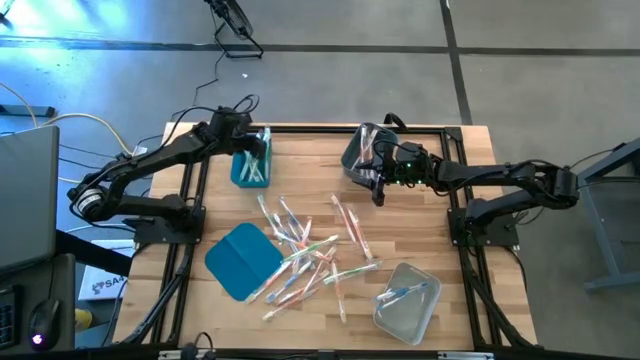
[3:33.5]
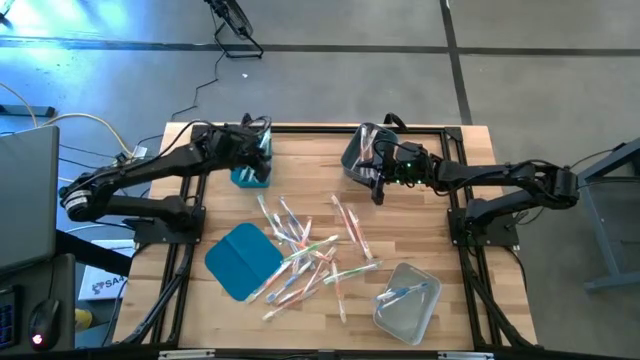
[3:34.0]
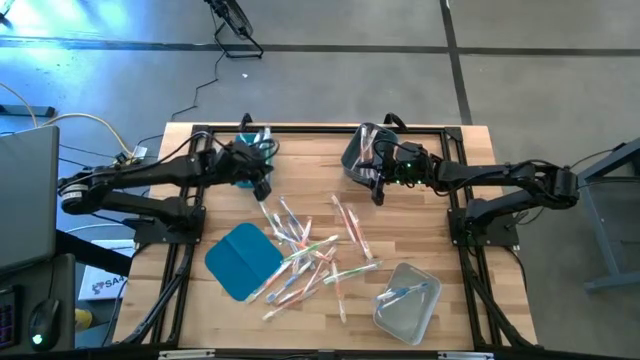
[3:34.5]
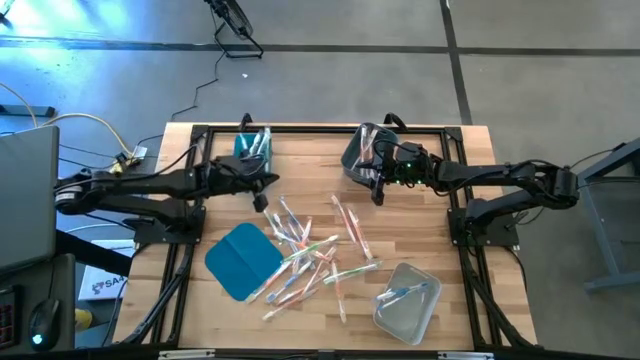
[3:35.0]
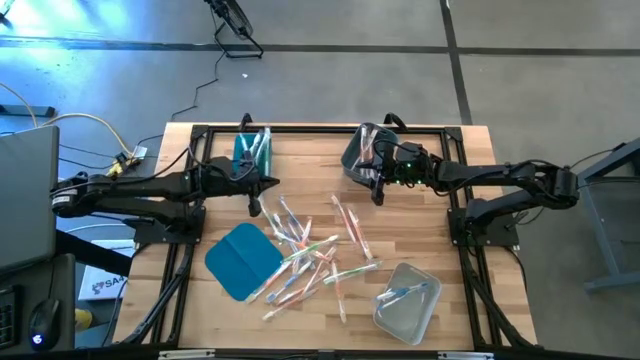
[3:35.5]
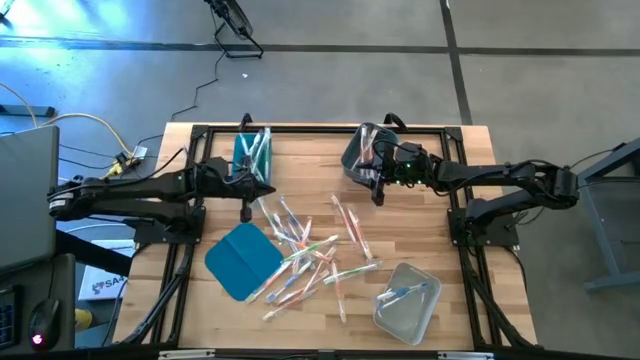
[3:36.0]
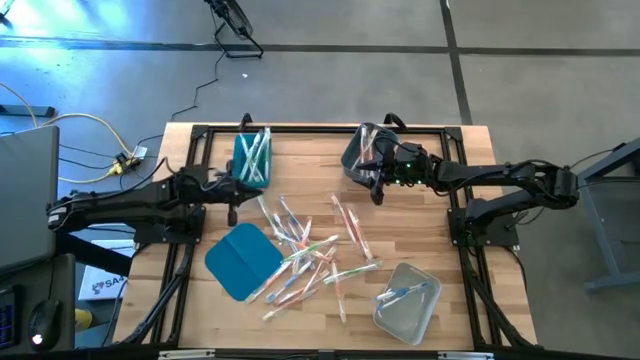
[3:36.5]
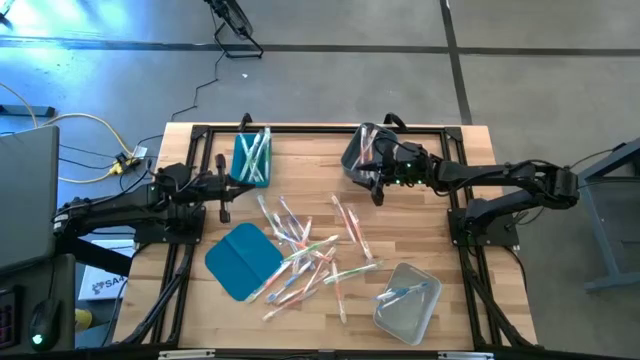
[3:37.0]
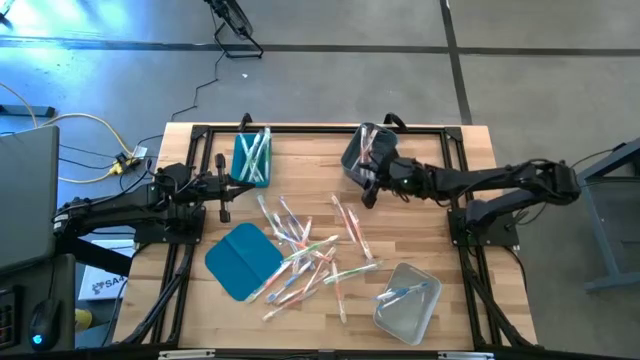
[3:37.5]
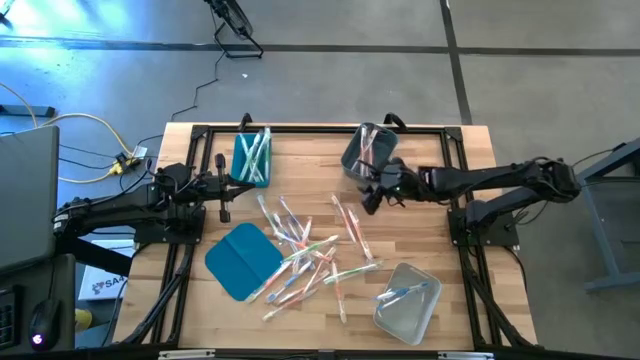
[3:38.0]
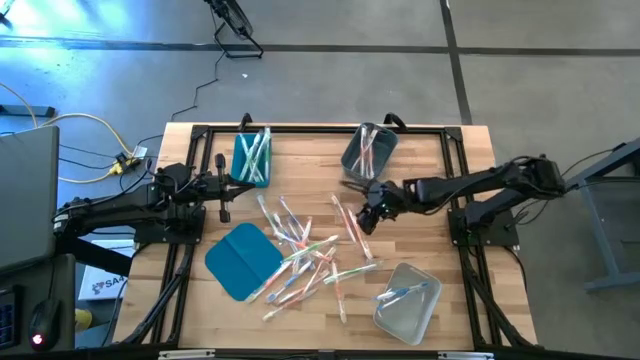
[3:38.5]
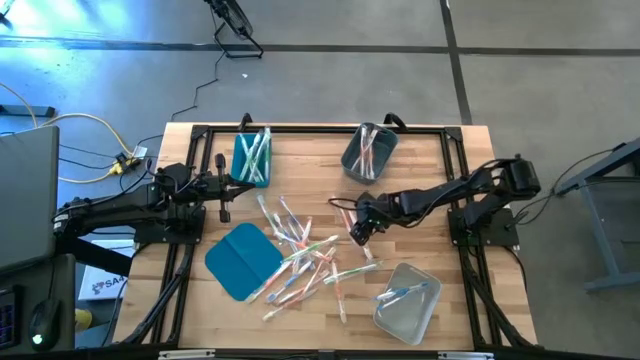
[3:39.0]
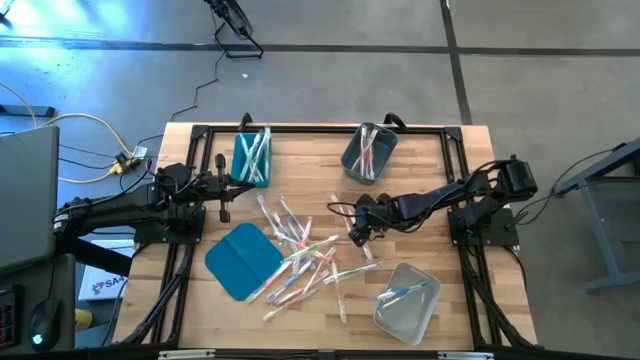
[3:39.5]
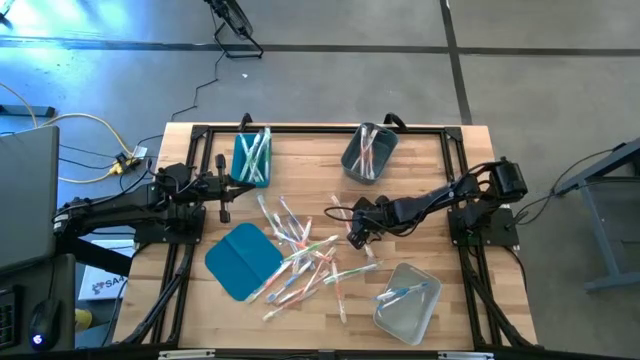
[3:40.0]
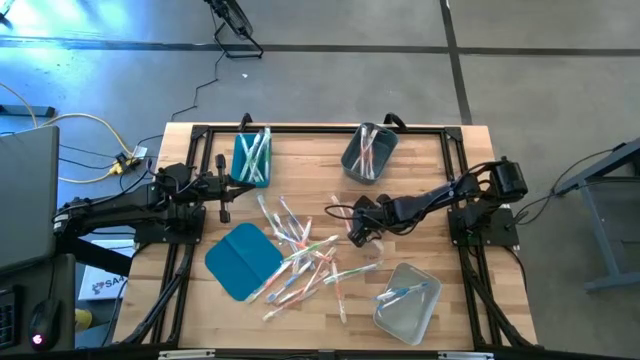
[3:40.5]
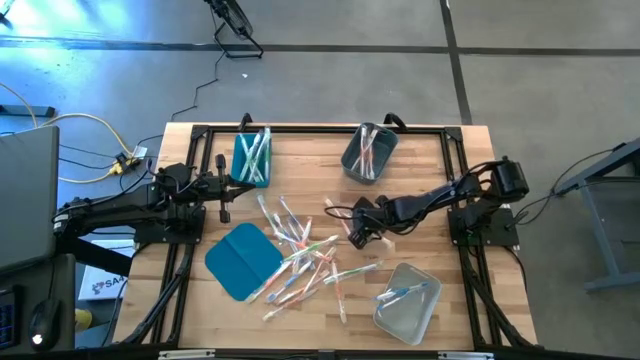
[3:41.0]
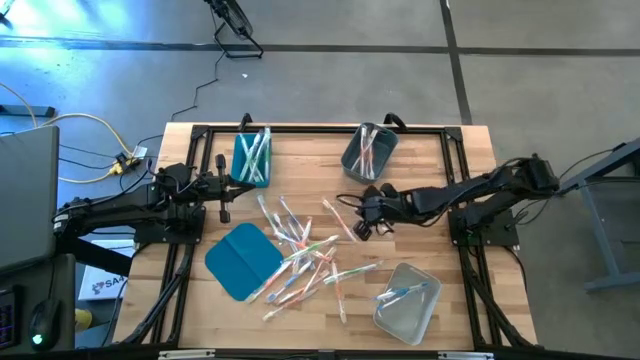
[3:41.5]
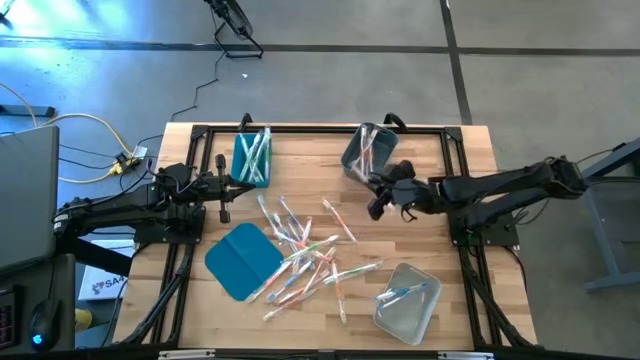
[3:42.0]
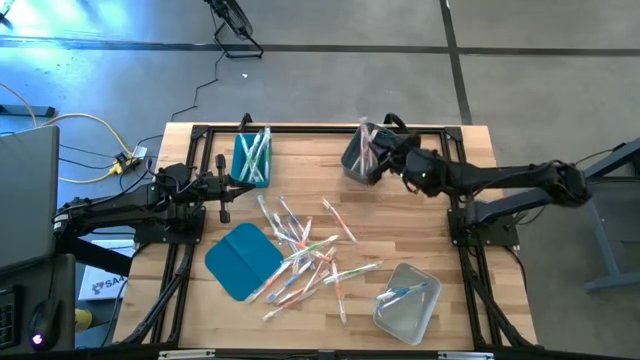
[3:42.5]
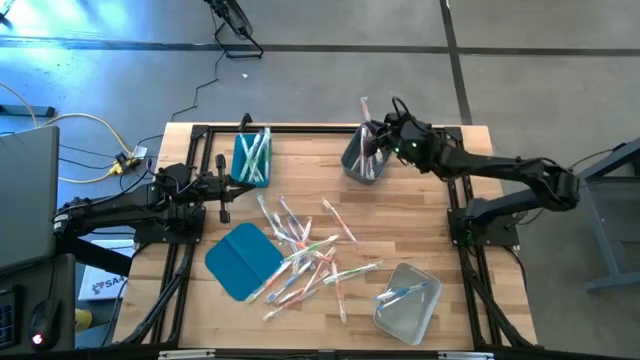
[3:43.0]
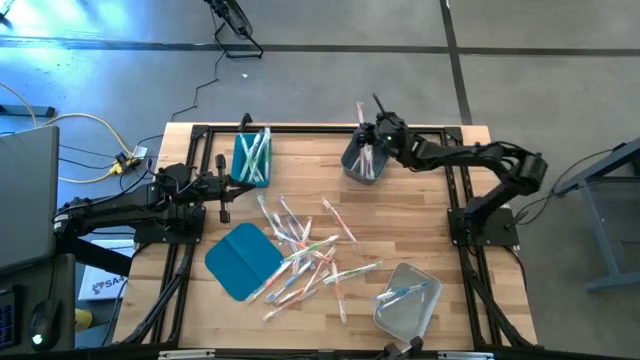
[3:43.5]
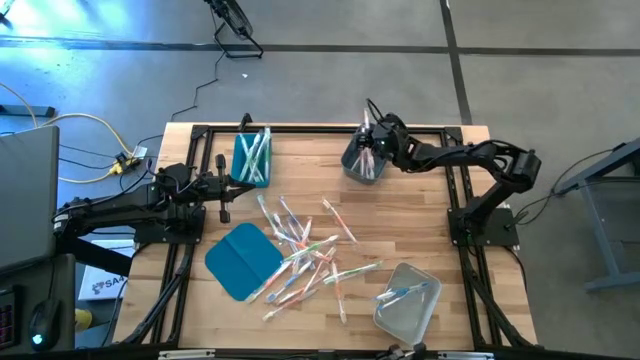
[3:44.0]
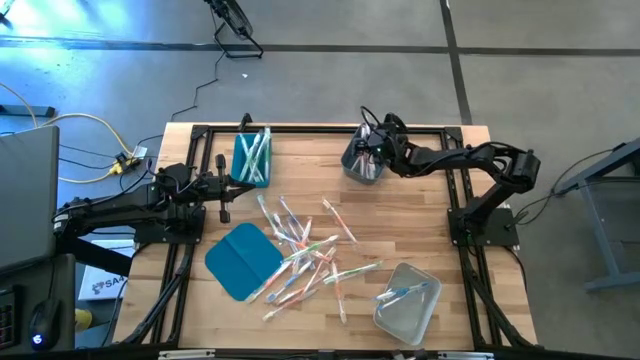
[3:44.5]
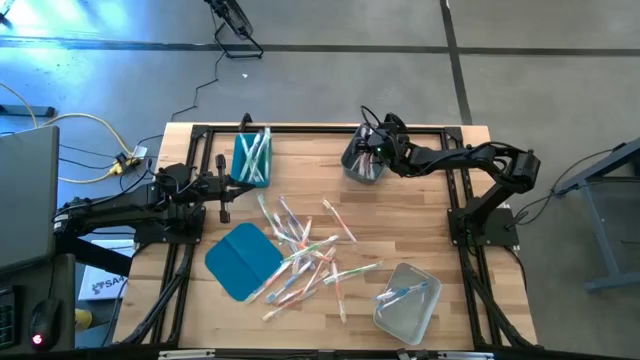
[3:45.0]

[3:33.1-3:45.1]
Task: Pick & Place Toothbrushes
Put the orange toothbrush into the dark gray bin

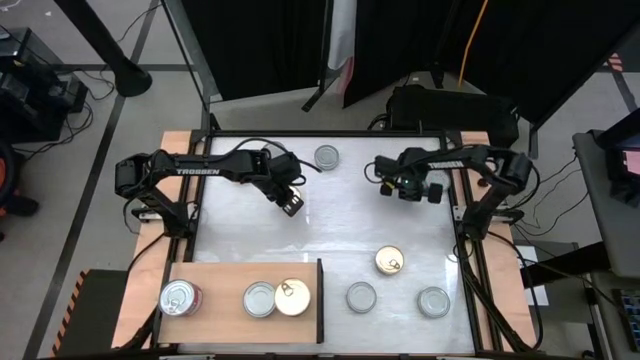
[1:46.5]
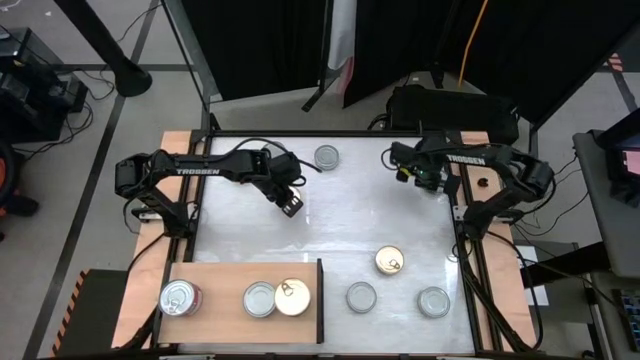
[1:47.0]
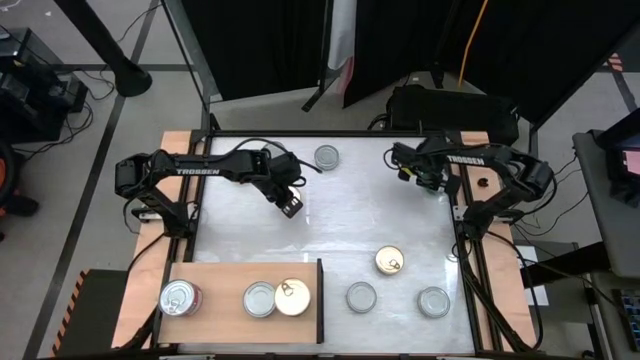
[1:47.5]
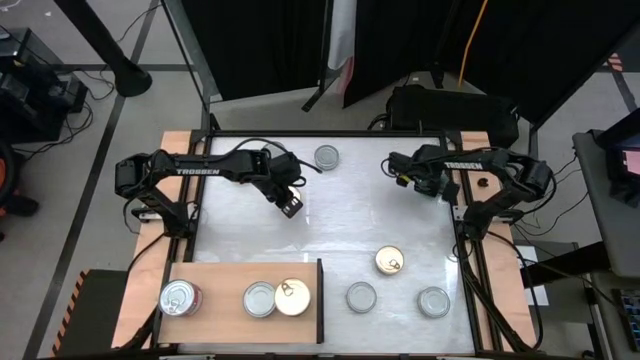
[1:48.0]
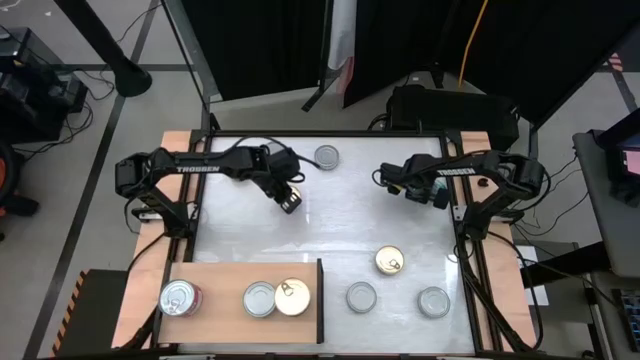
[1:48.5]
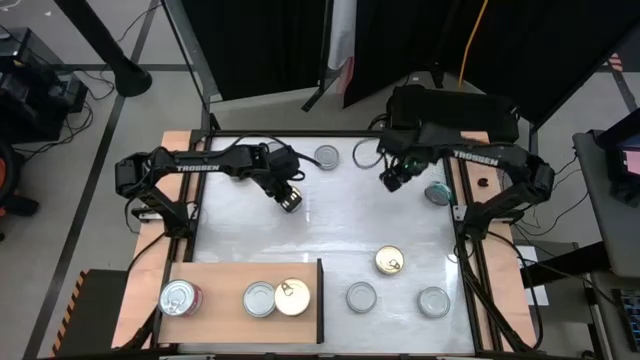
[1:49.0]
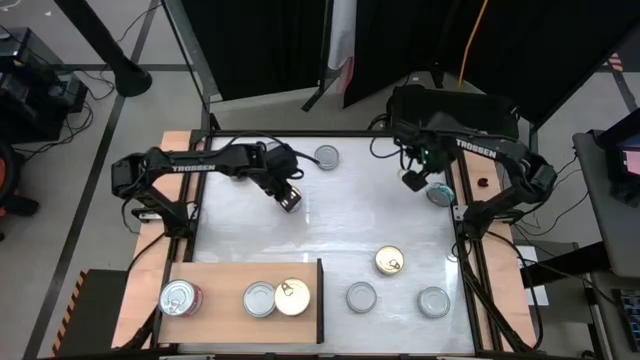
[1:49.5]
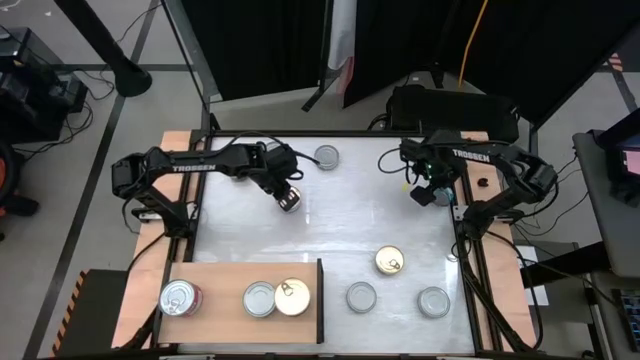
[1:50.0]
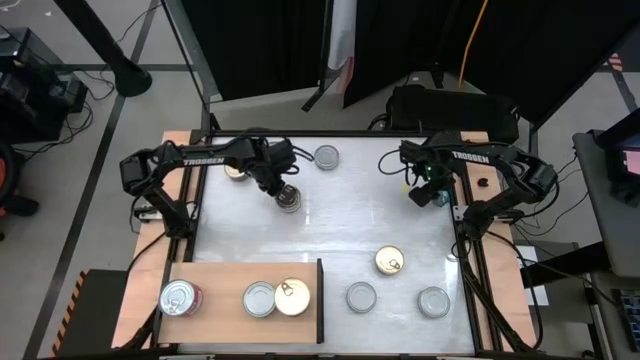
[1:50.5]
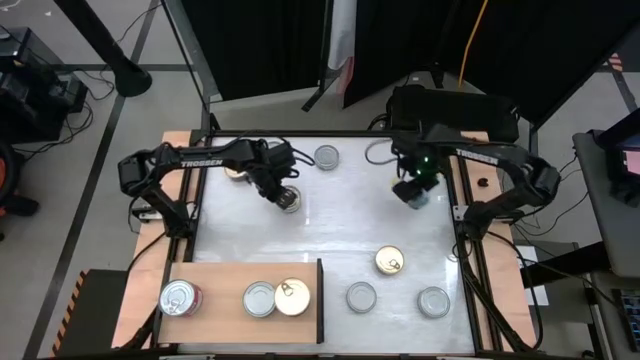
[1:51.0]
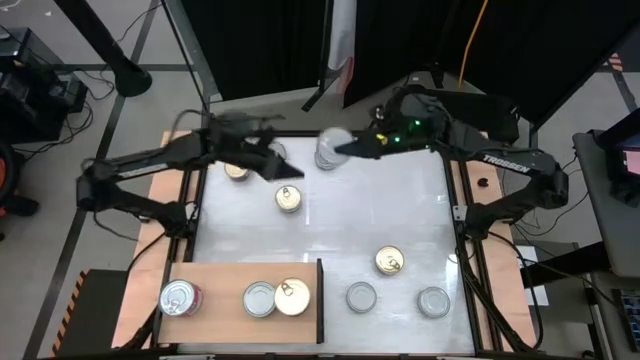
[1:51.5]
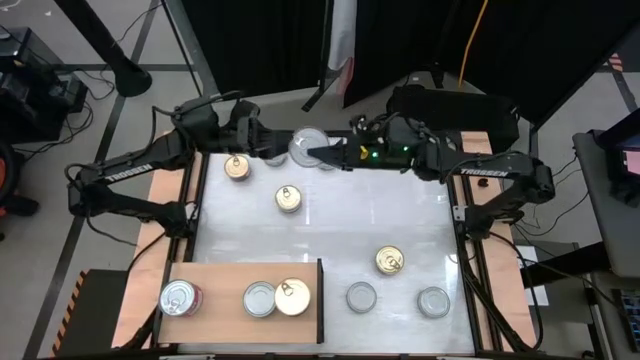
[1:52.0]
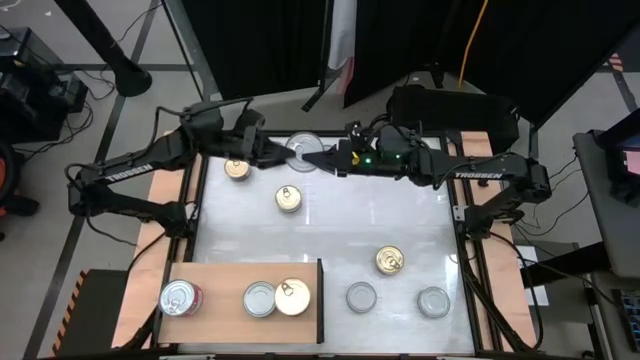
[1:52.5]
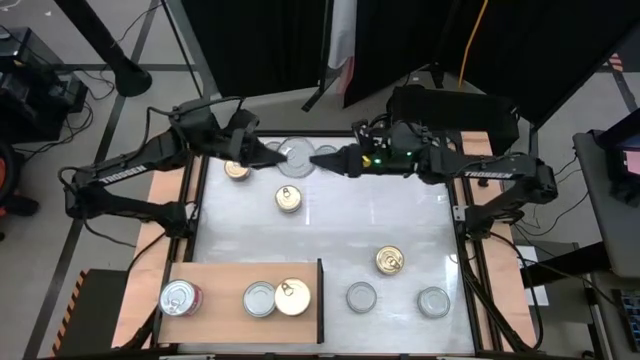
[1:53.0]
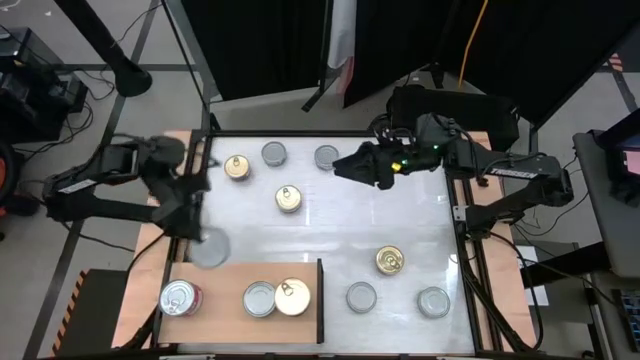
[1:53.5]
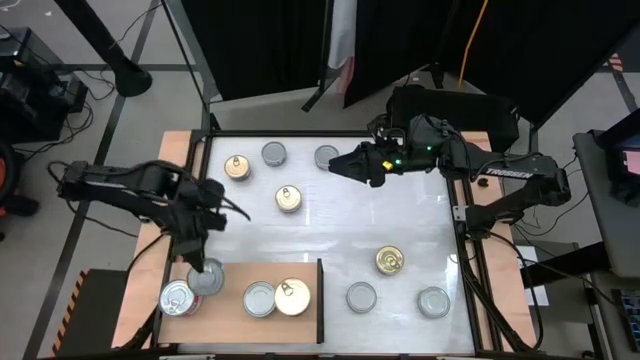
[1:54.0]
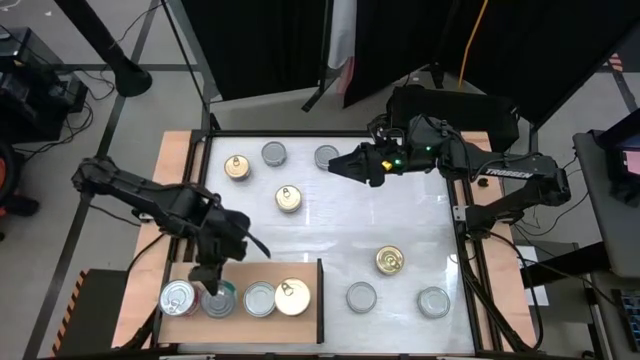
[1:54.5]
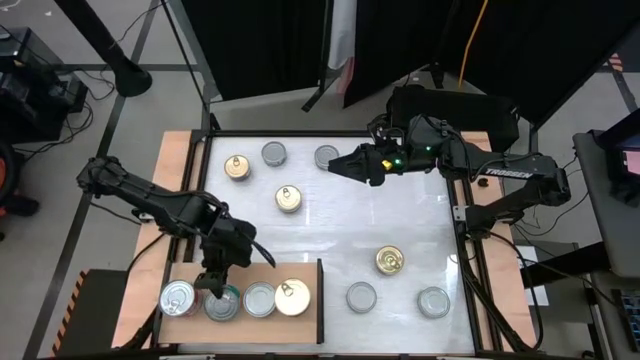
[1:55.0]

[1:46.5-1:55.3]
Task: Stack canned seafood by type on shelf
Put the green blue tuna can on the shelf

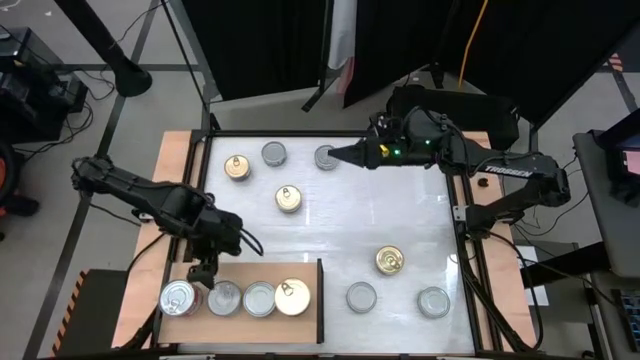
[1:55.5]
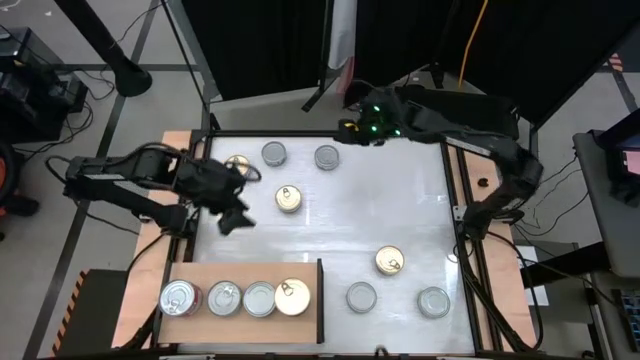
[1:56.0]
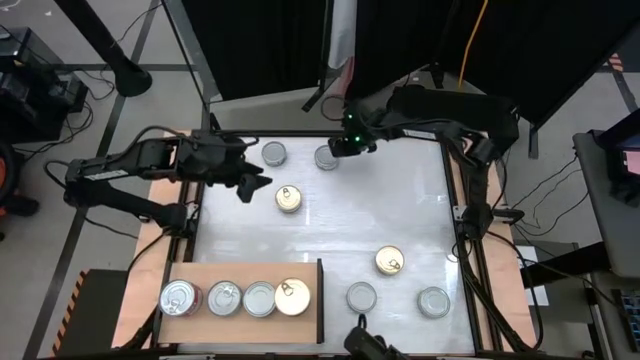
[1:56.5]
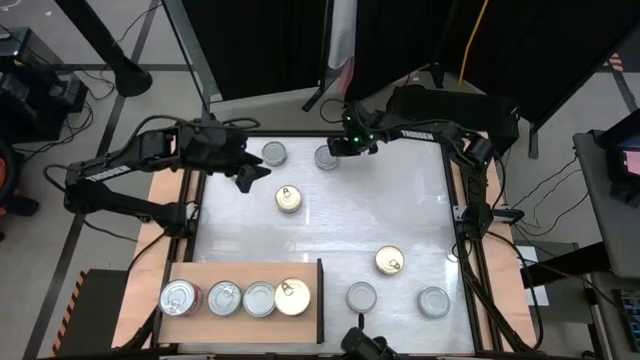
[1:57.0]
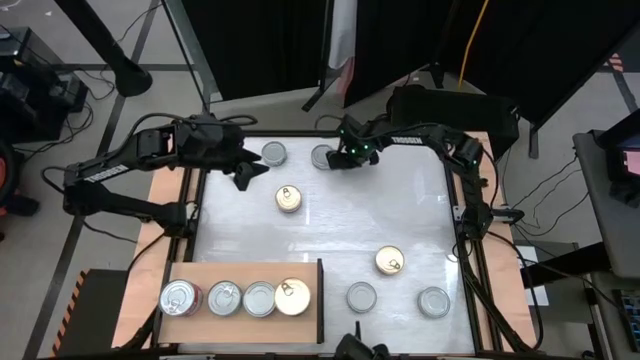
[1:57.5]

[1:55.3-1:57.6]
Stack the green white tuna can on top of other green white tuna can on the shelf
